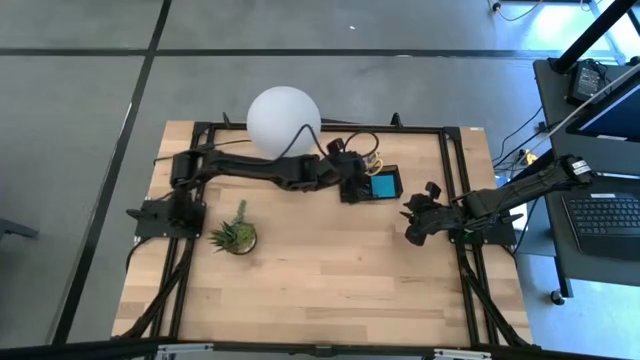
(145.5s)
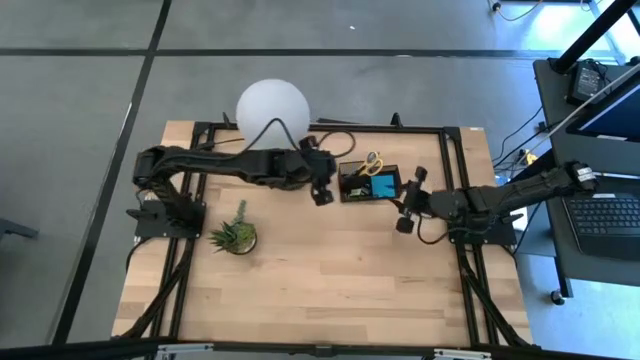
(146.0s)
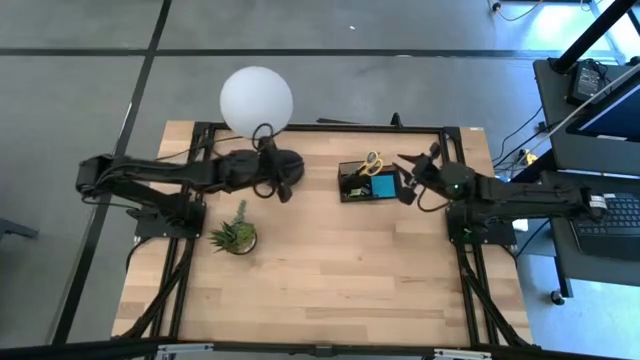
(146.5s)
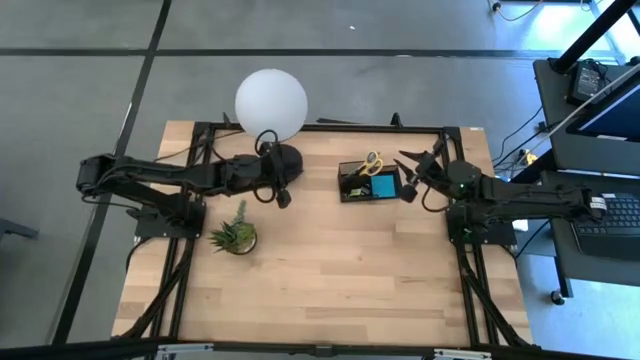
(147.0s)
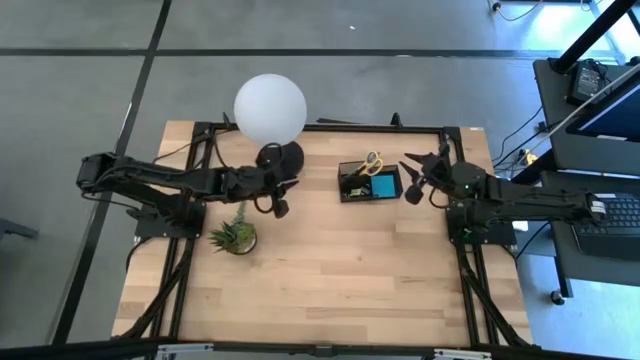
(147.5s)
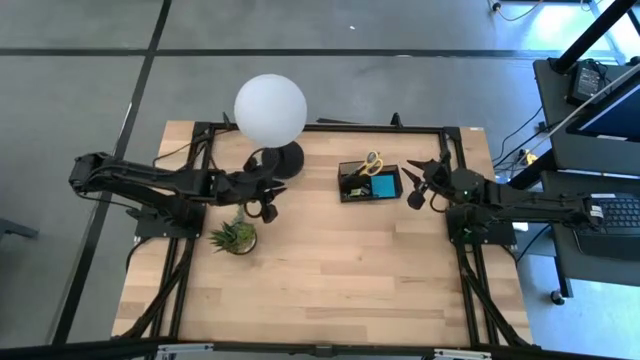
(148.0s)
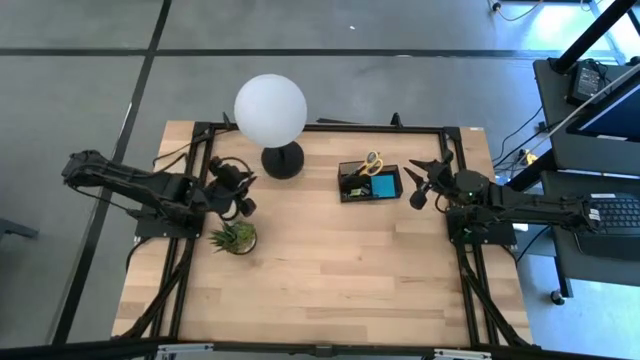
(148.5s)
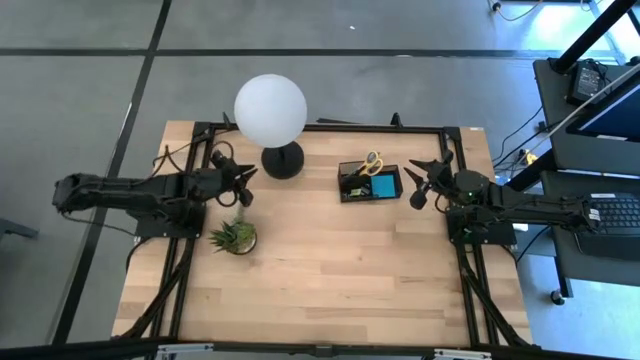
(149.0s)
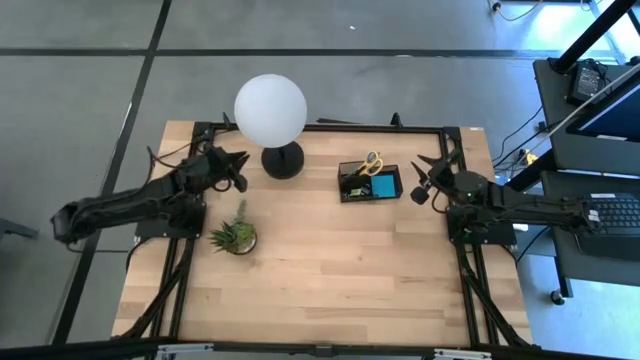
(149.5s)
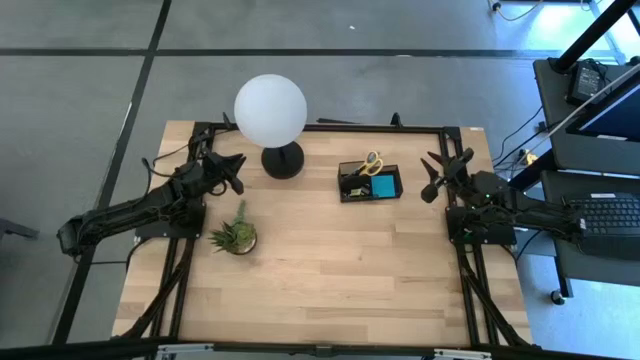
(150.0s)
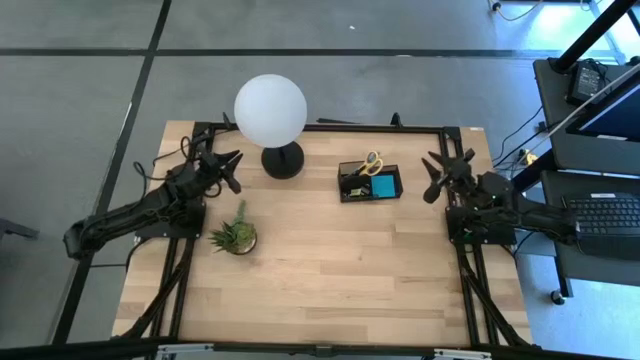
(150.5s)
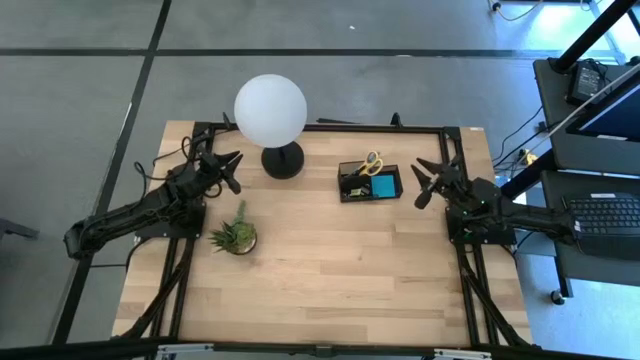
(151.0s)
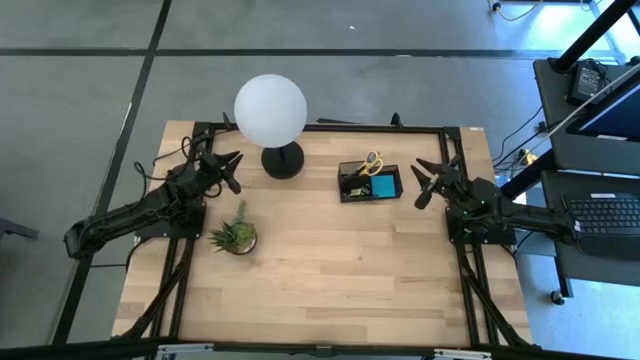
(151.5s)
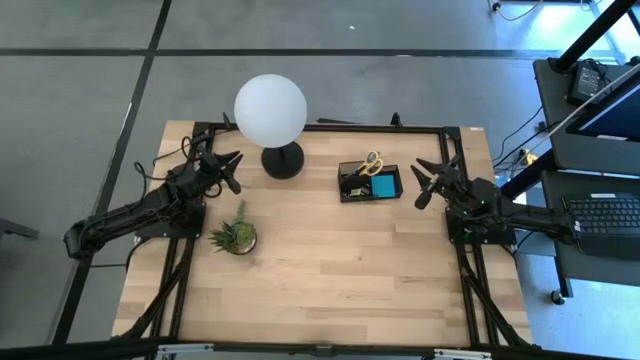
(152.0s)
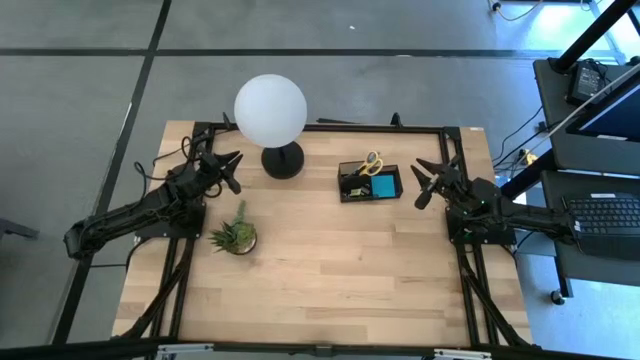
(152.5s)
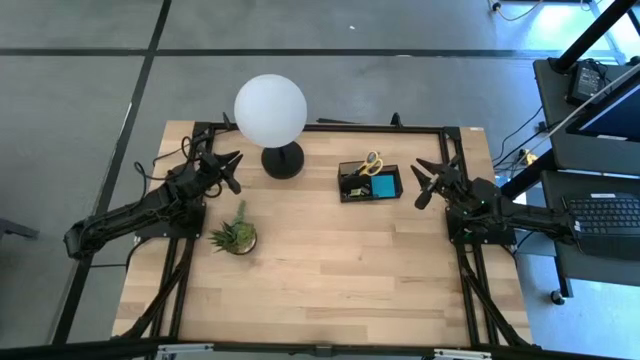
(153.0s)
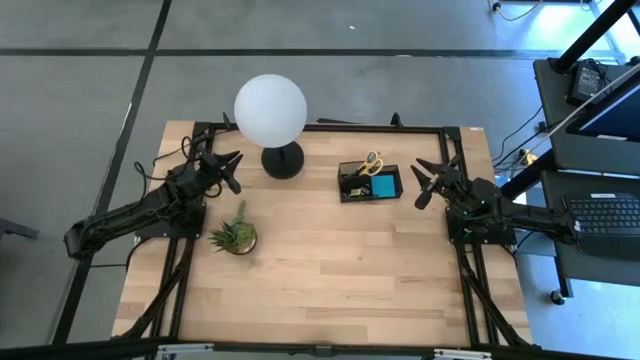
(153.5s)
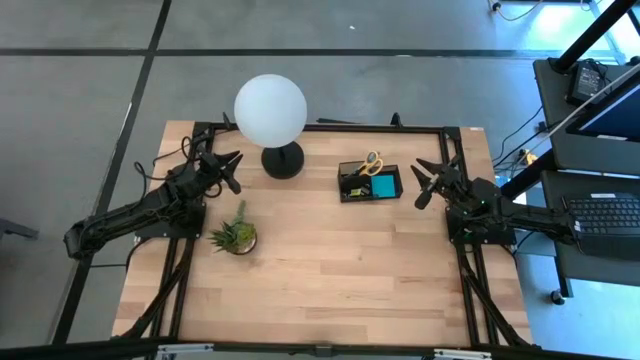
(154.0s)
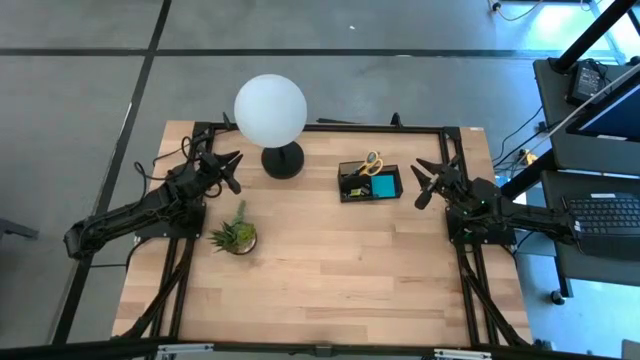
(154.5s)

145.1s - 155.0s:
Task: Pick and place office supplies into organizer
Return to Home Position

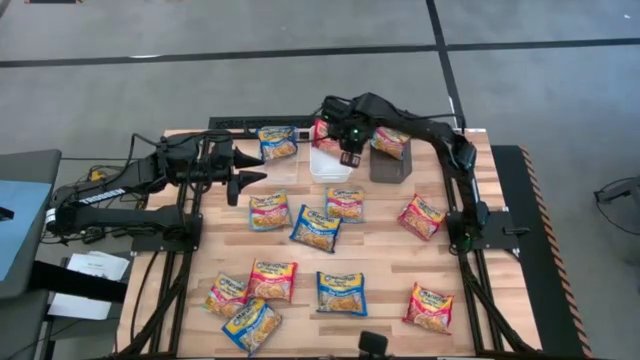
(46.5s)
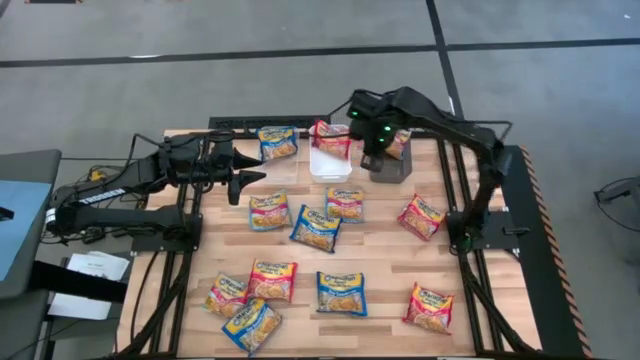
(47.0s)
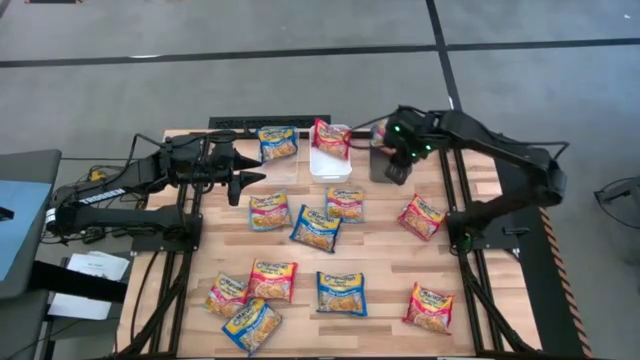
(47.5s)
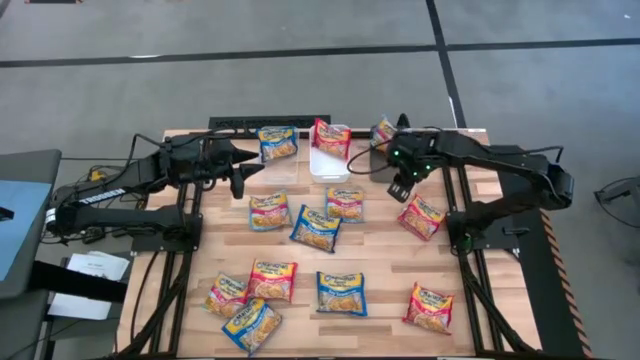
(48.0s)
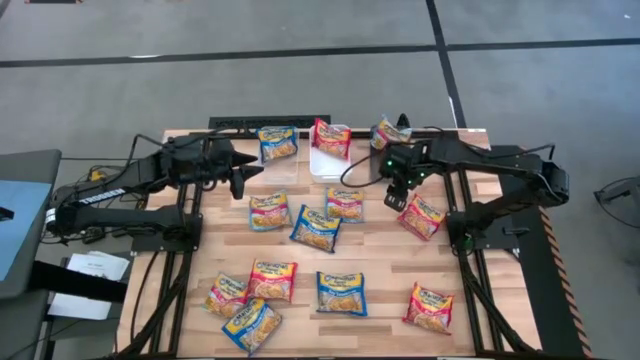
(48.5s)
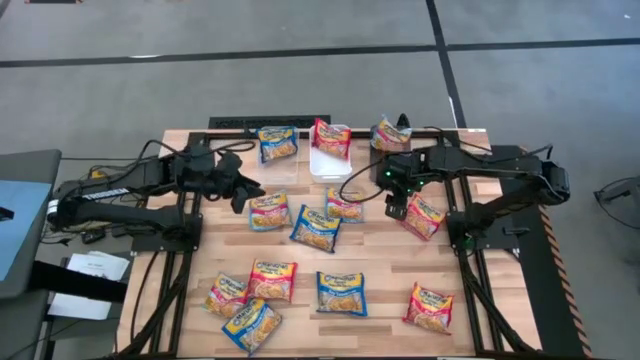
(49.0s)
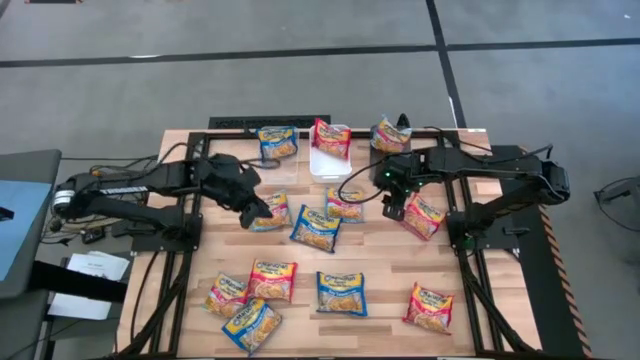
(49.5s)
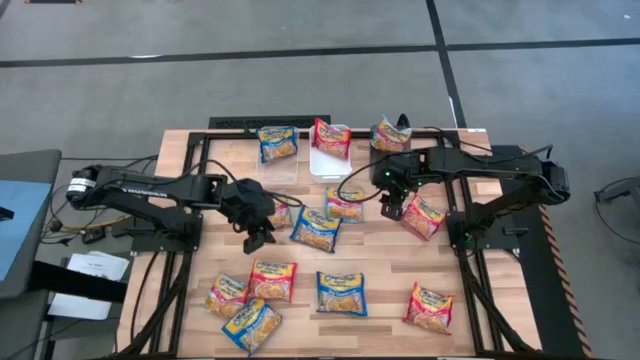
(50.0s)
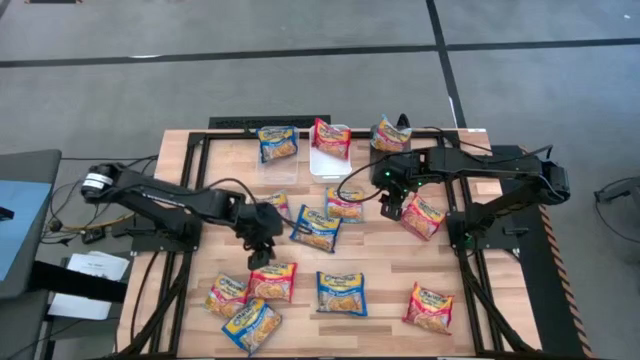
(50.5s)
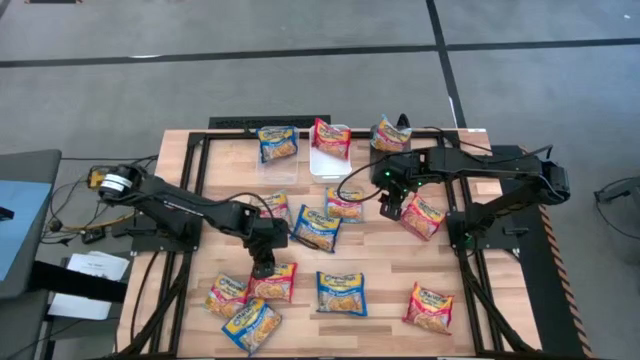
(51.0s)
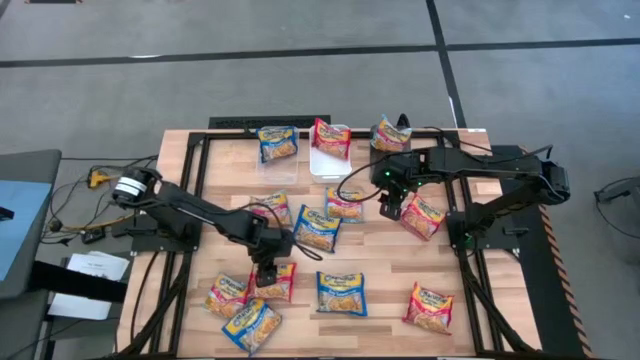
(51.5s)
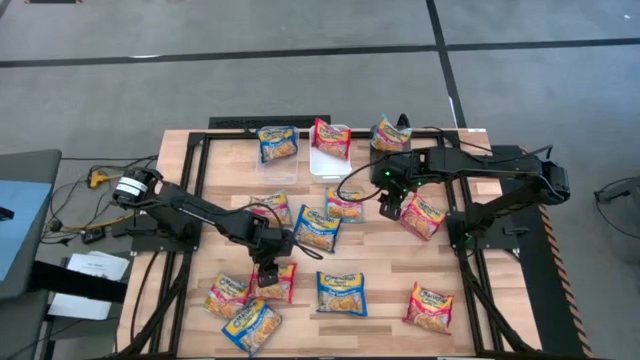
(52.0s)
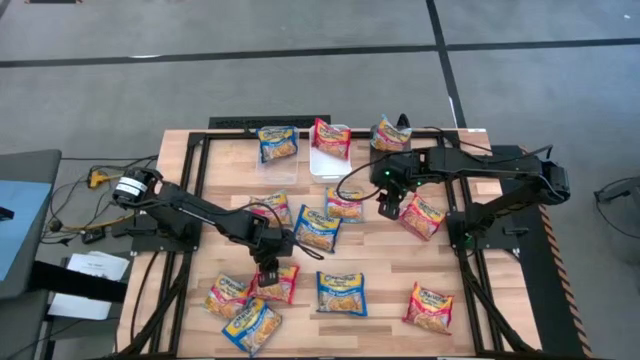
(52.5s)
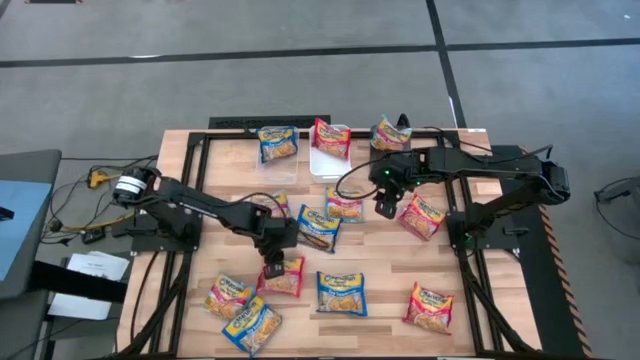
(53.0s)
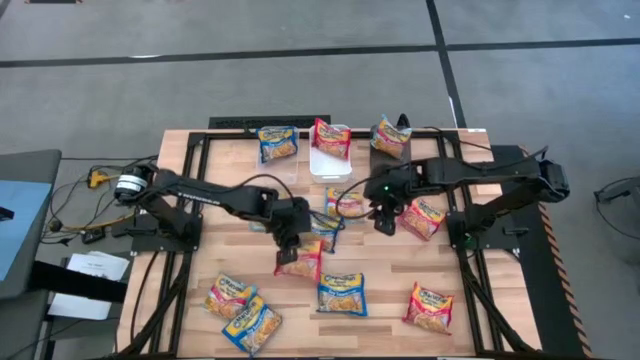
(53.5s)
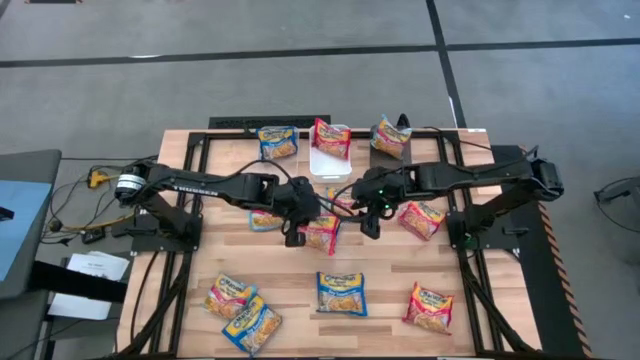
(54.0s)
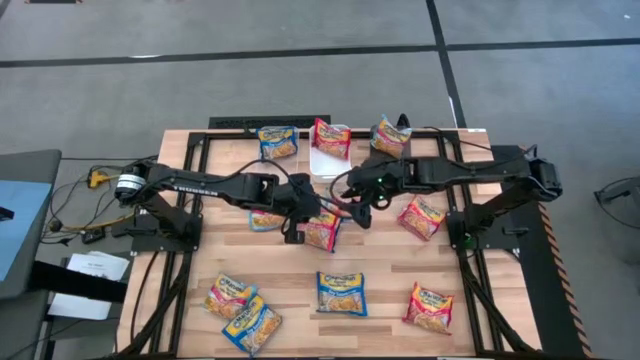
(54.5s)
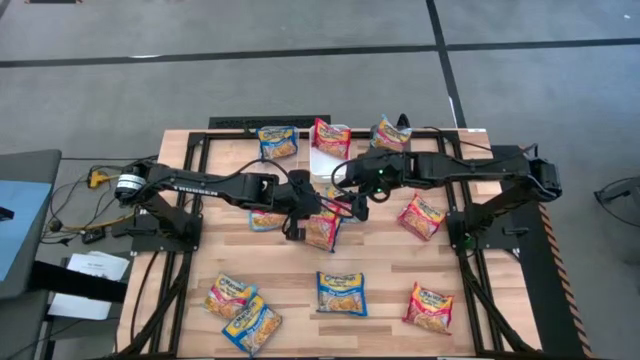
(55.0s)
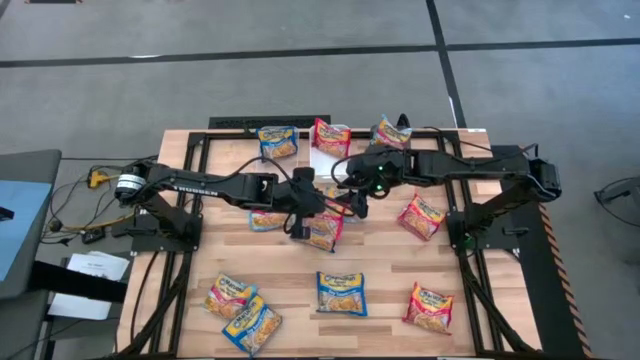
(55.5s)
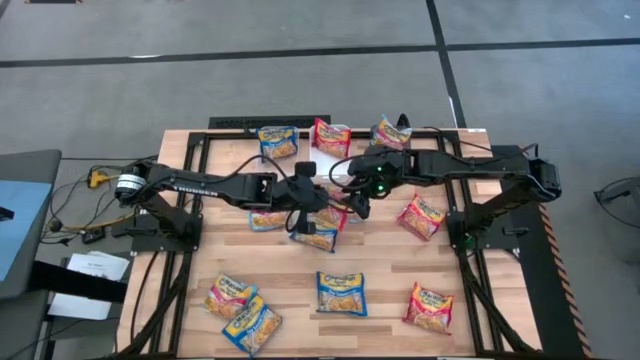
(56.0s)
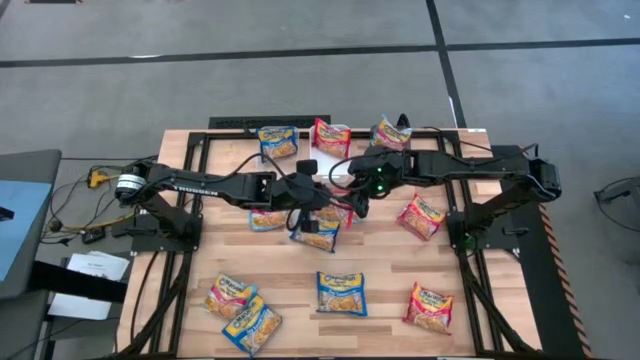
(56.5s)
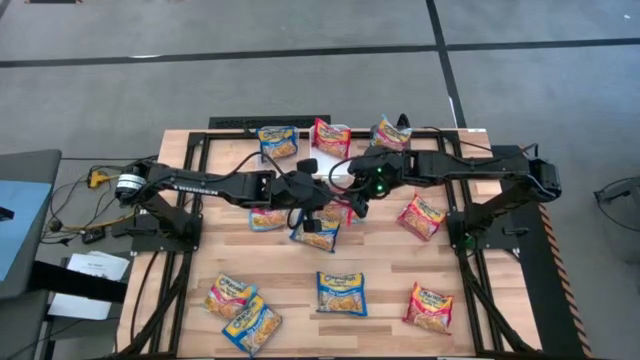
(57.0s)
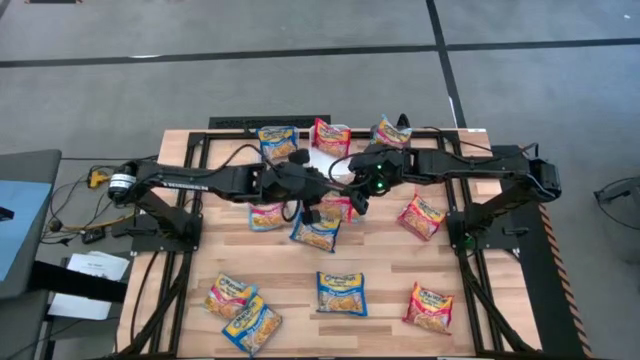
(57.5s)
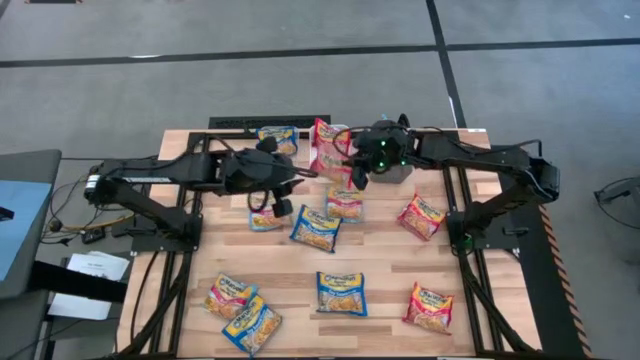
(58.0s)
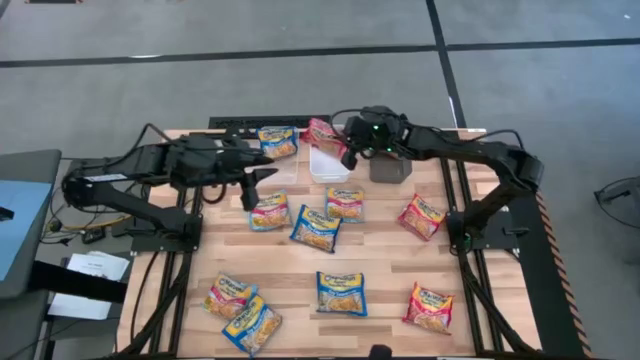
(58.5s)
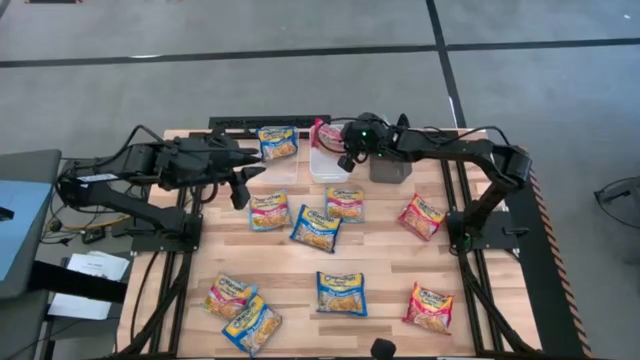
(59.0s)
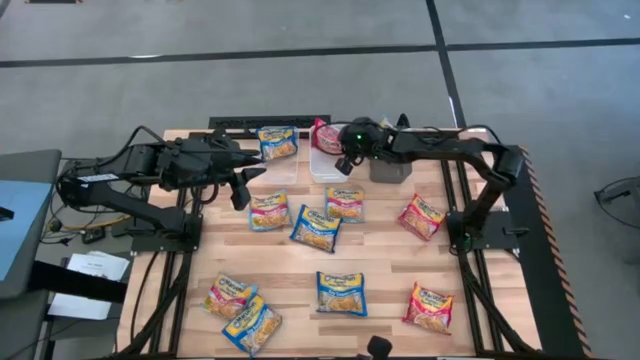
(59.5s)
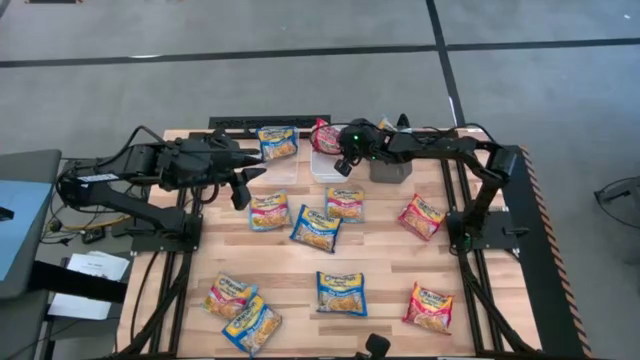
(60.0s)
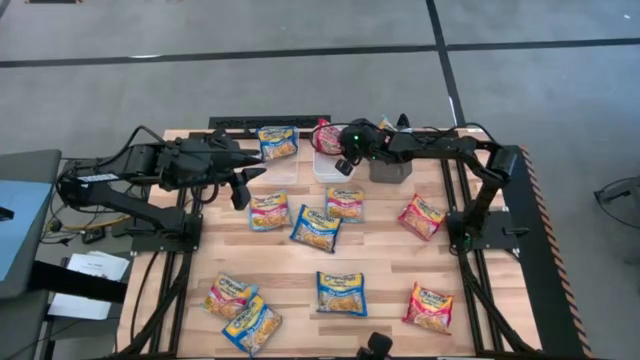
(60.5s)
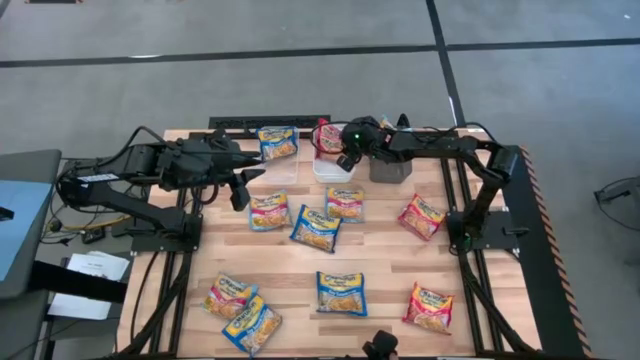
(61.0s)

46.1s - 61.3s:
Task: Sort Maruchan noodles
Put the red noodle pack into the white bin
